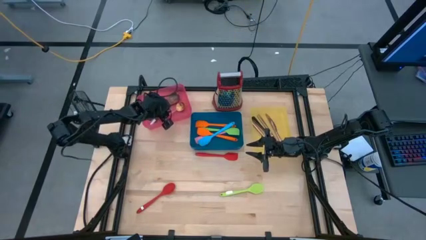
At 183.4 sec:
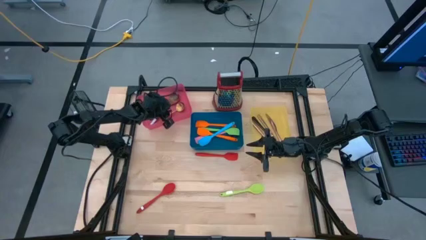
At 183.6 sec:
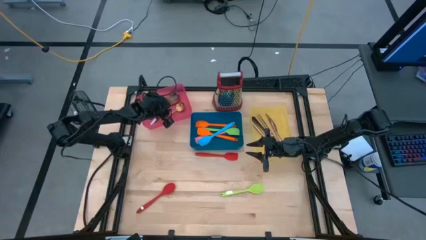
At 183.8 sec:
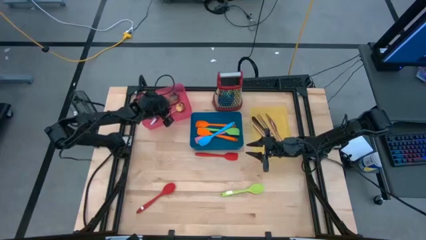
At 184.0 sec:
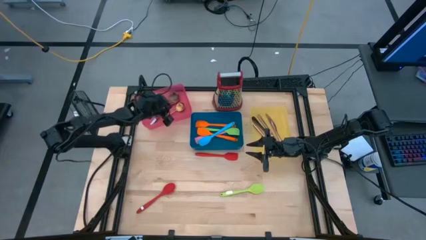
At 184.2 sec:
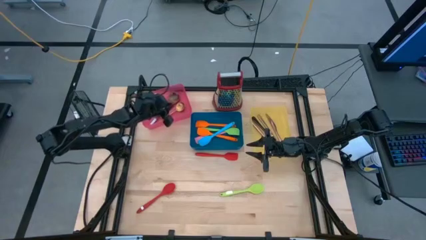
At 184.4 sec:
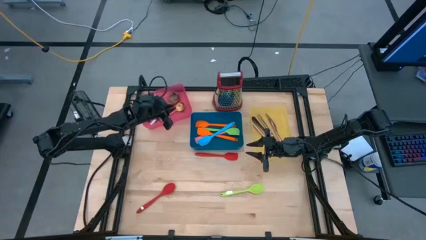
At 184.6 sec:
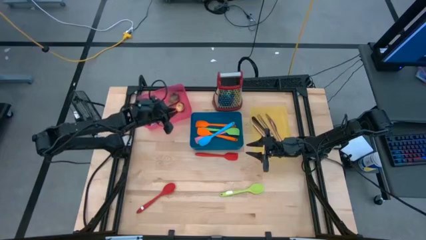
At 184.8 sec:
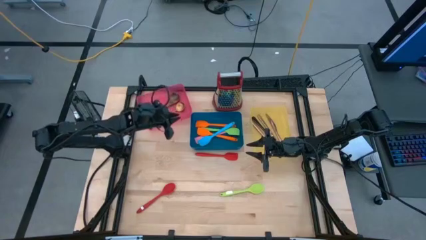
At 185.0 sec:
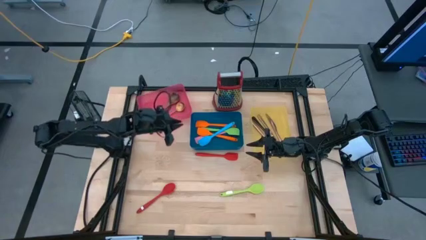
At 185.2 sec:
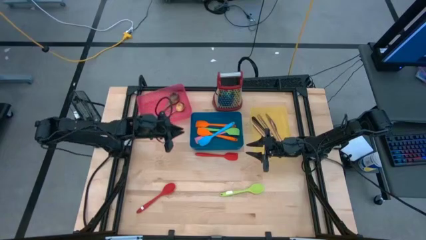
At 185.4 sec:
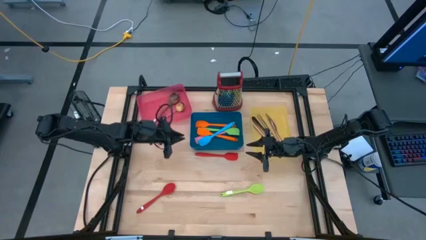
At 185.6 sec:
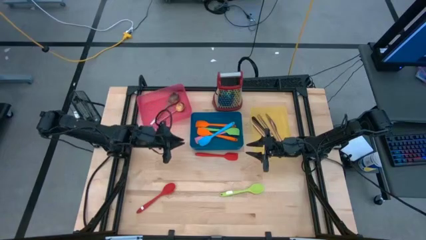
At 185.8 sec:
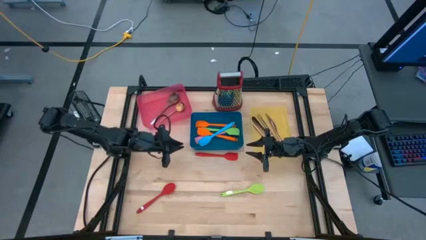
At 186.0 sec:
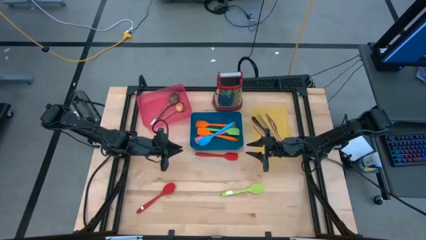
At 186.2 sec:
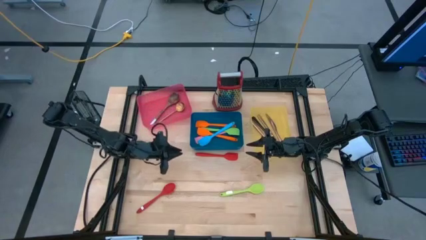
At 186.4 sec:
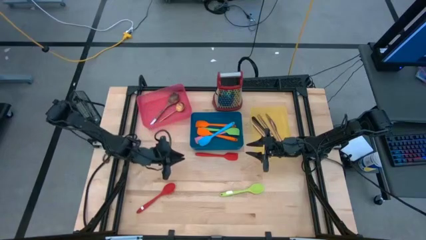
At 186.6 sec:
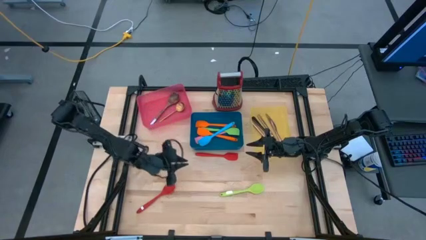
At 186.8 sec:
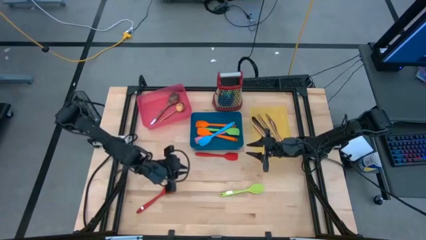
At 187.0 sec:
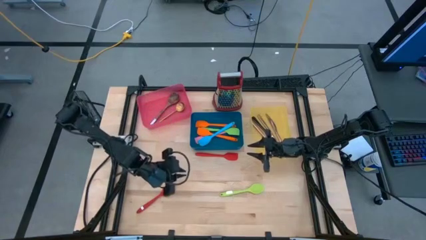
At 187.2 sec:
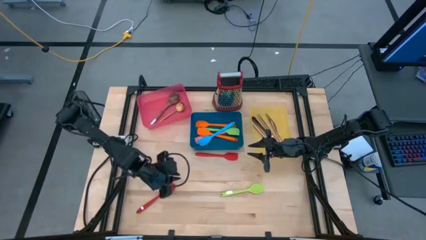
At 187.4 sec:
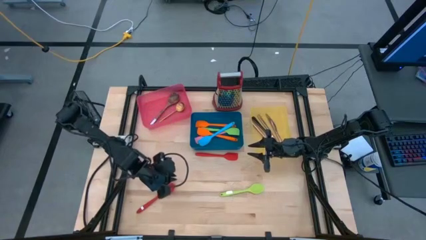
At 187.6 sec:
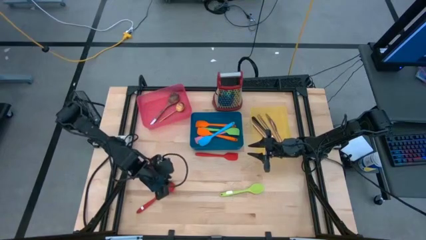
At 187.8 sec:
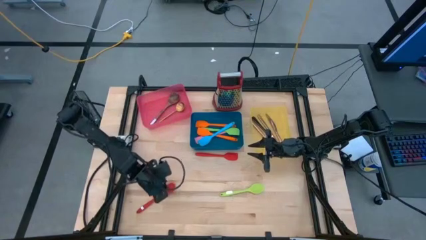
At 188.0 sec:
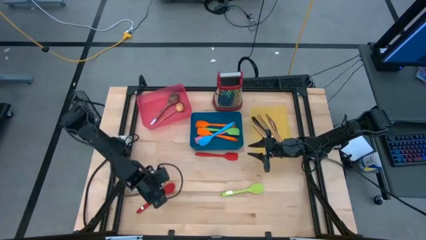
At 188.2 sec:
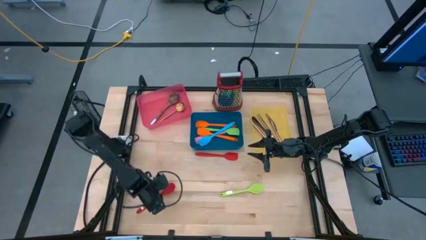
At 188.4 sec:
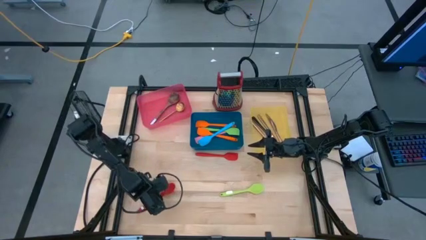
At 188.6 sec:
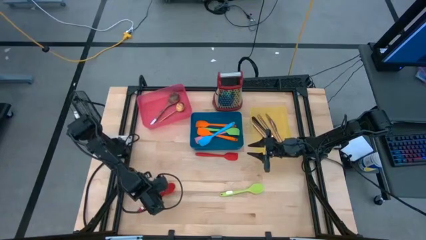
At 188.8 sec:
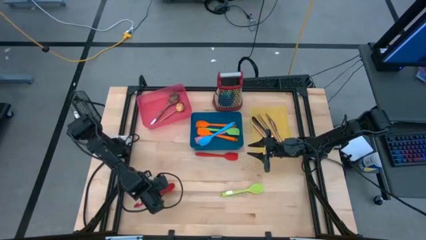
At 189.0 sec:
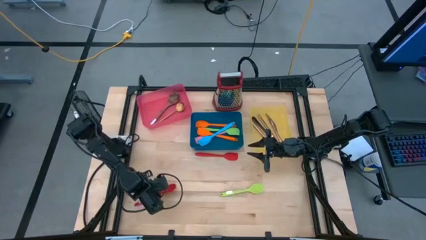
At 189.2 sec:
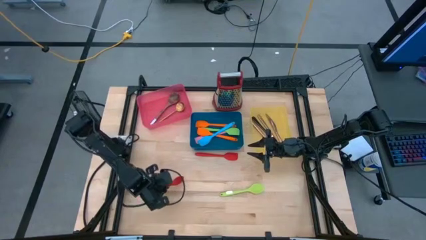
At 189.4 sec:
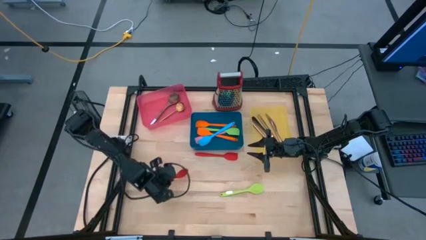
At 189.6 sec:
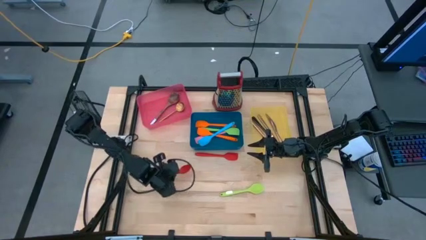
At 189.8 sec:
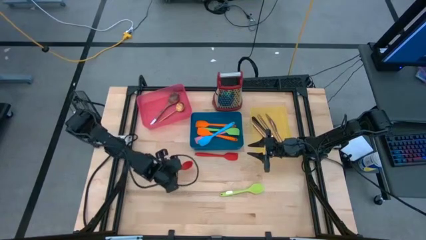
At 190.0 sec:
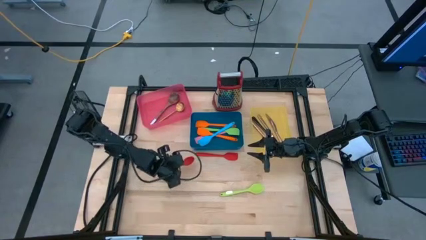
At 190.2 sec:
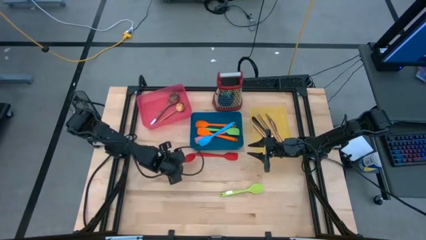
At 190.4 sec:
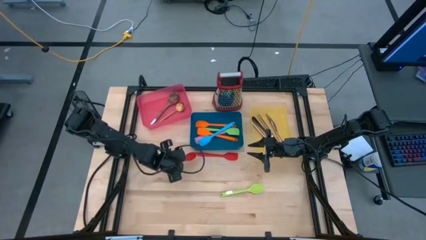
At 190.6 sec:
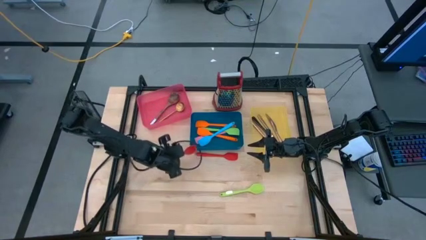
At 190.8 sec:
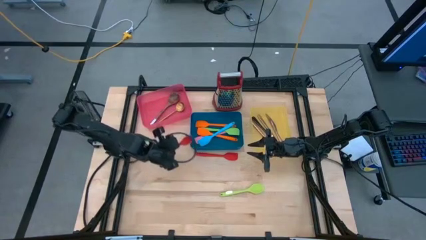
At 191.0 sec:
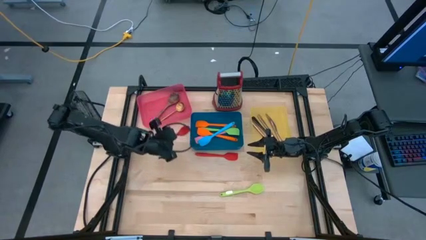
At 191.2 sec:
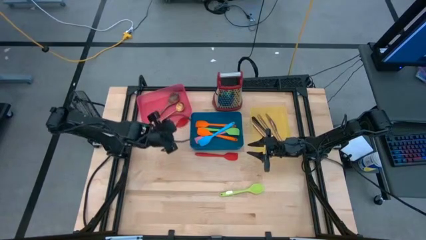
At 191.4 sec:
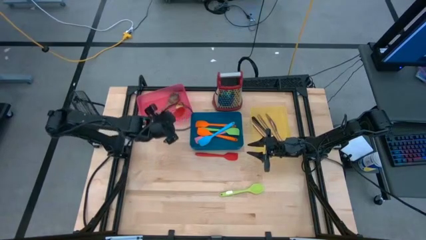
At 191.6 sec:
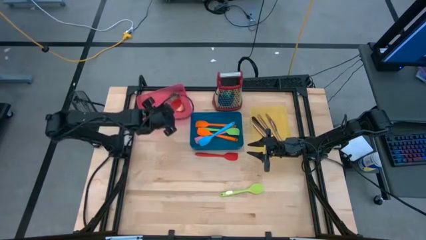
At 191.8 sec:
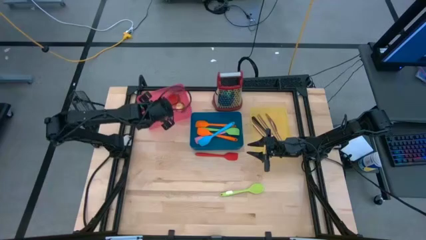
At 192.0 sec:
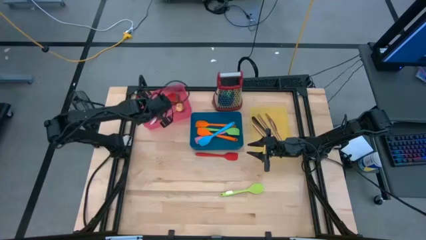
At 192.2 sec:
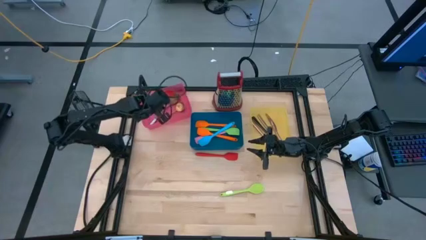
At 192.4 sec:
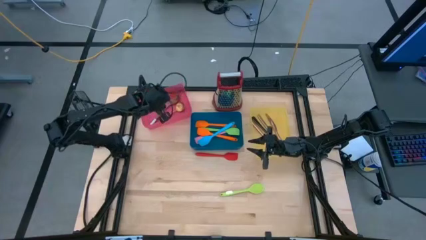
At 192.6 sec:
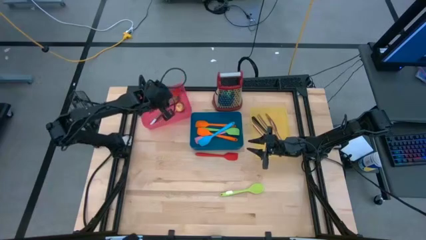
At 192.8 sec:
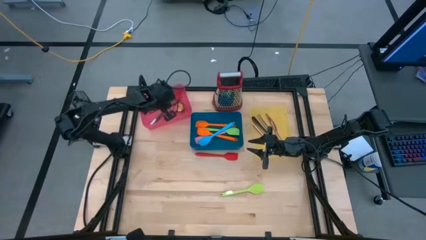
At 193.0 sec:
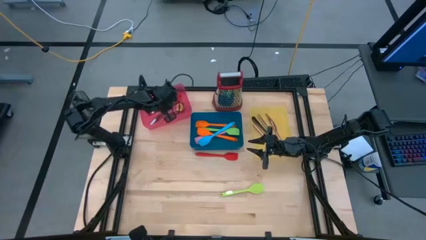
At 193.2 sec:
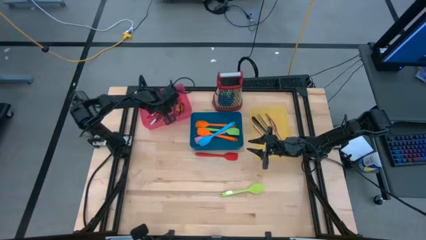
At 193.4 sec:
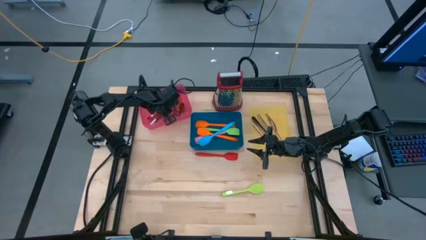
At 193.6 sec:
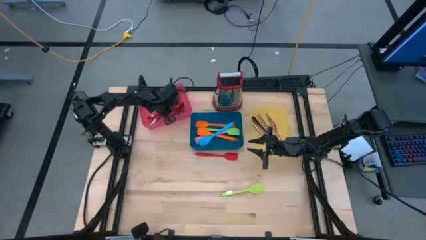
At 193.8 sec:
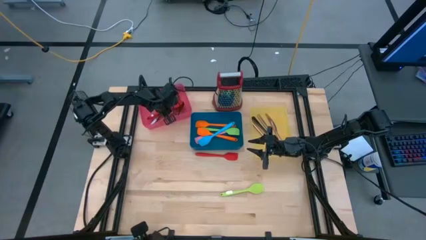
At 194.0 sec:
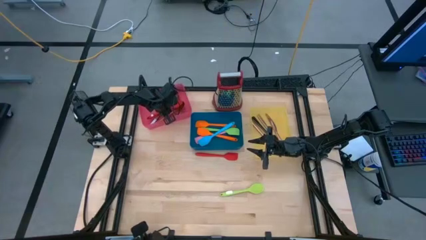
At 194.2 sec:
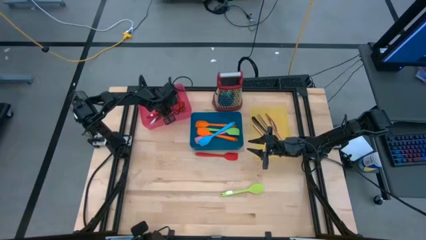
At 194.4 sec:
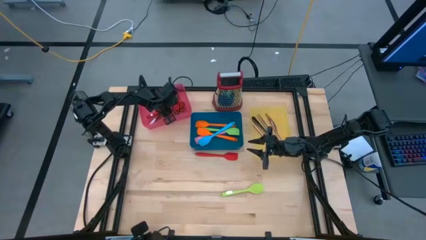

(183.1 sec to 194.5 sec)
Task: Pick & Place Kitchen Items
Put the orange serving spoon into the pink bin

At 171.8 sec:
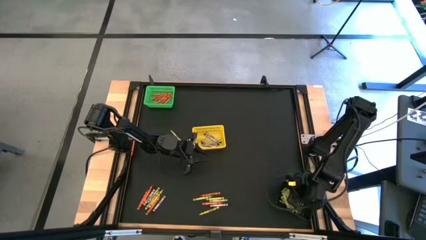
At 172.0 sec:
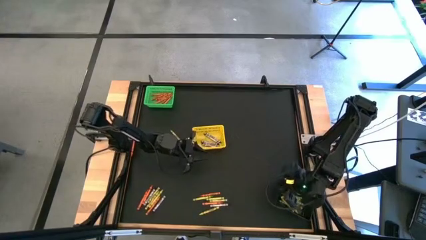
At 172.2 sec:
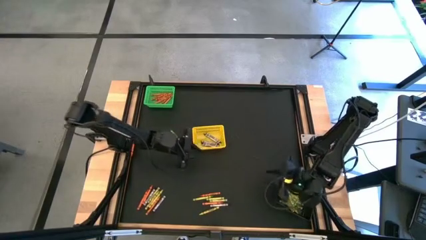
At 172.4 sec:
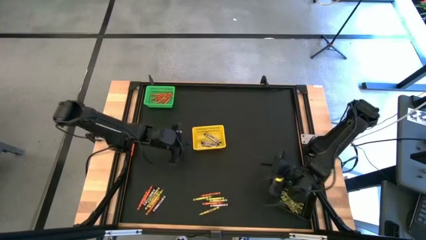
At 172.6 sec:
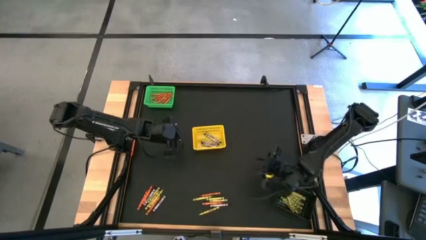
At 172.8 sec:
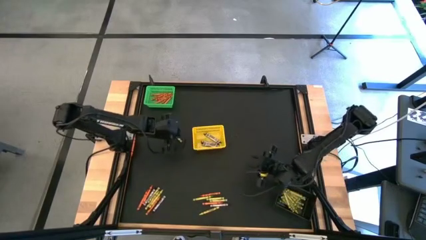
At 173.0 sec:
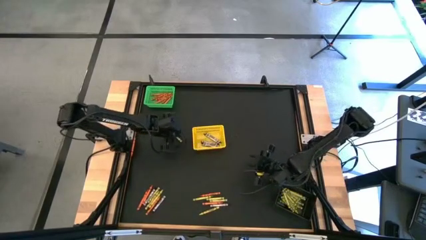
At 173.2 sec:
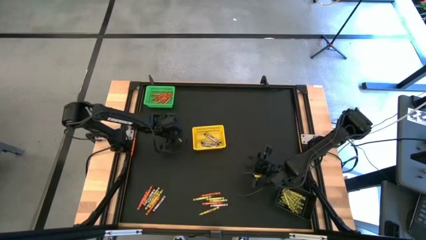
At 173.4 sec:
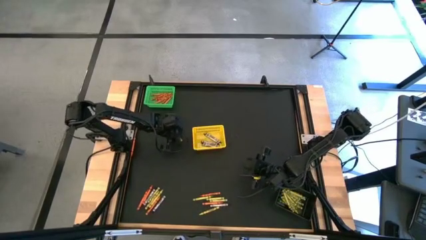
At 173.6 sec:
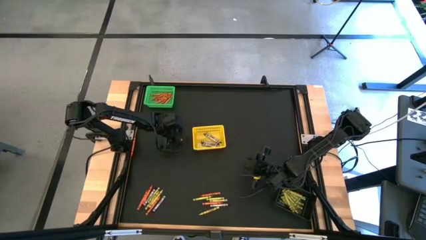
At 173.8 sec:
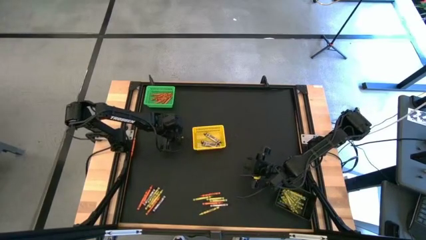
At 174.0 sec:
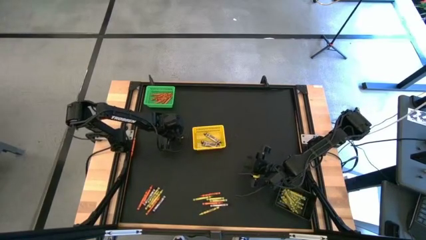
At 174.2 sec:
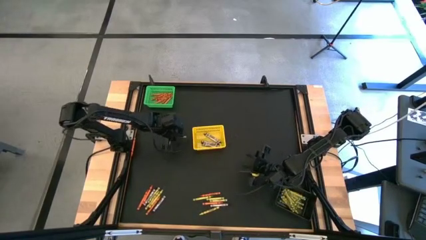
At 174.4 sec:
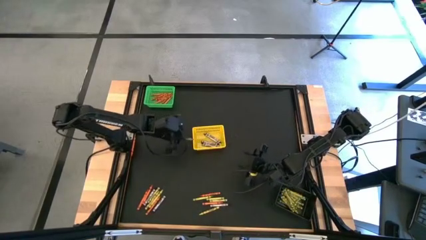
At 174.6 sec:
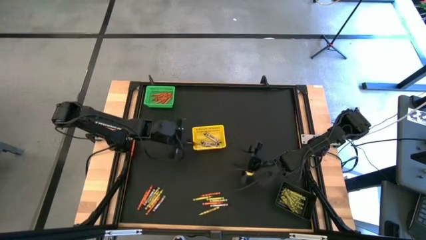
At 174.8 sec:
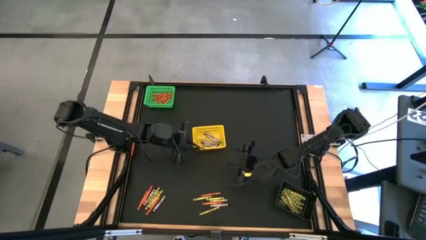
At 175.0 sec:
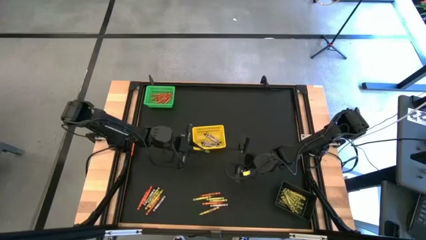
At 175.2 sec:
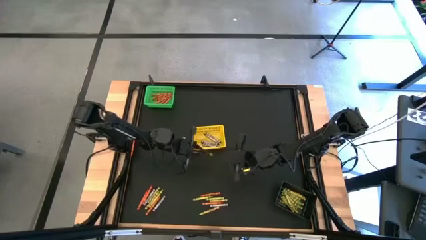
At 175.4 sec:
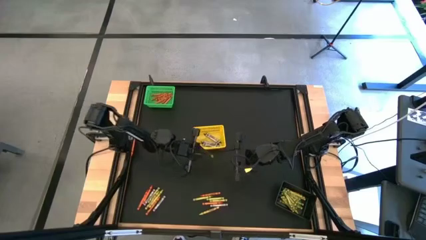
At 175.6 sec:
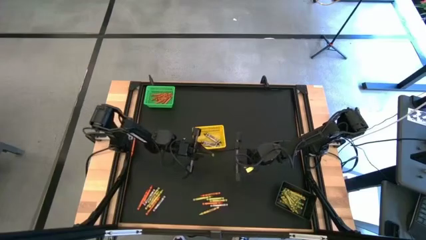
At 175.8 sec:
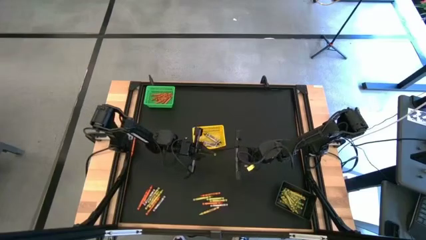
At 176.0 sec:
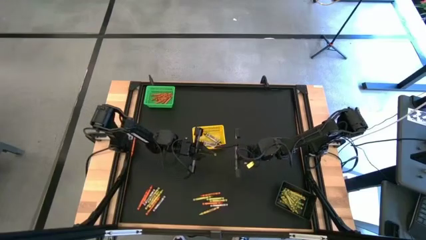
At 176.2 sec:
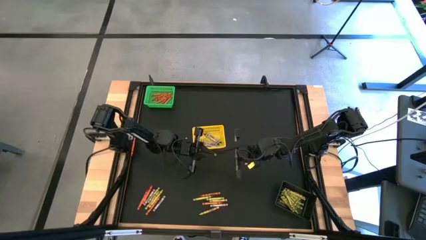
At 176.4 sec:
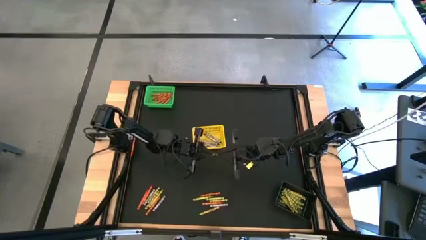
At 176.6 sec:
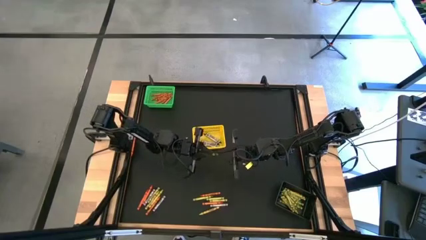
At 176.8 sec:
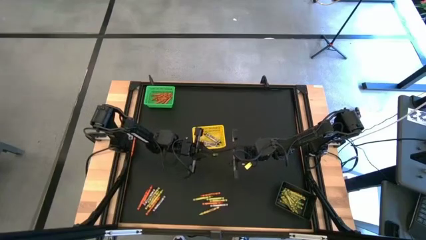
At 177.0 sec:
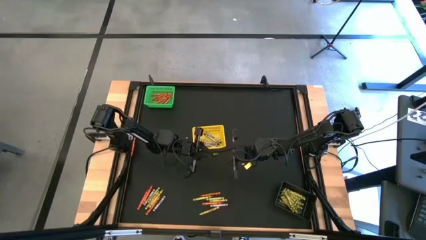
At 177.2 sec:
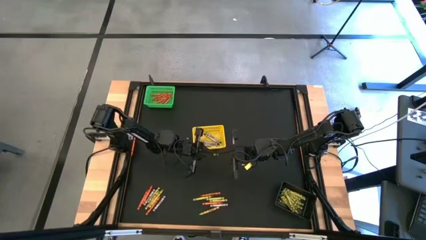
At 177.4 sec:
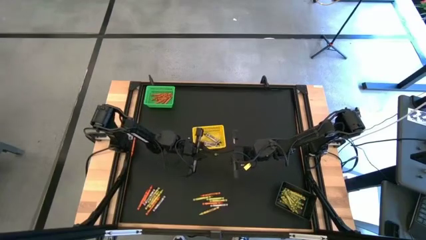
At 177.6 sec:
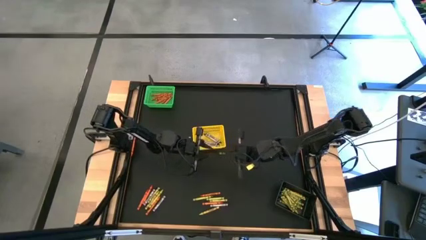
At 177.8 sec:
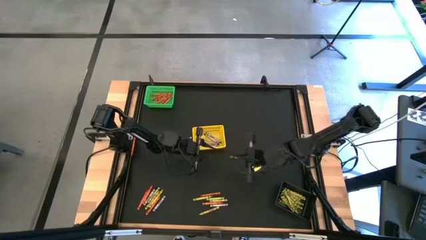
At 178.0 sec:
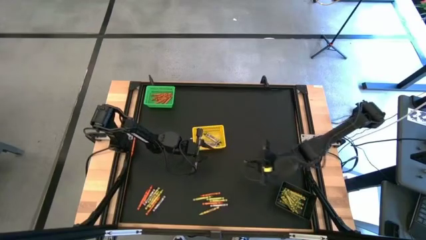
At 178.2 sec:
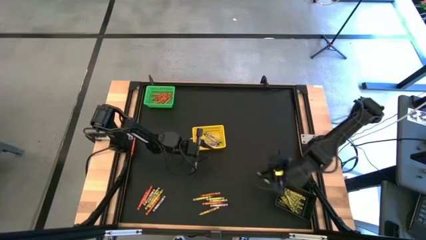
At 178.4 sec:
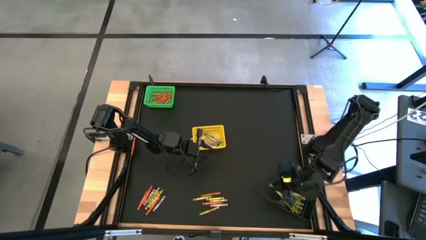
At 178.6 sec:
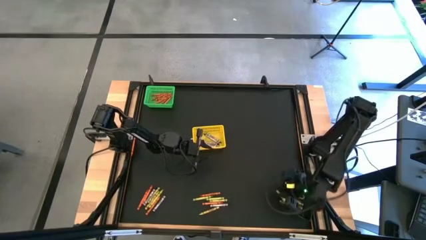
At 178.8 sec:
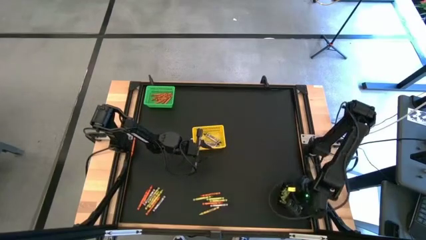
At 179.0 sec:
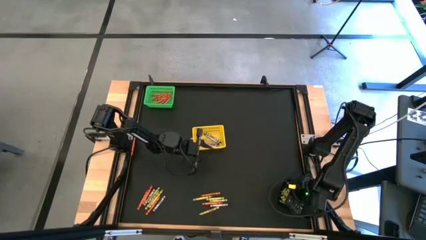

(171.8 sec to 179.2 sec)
Task: Sort crayons
Put the green crayon into the black bin
